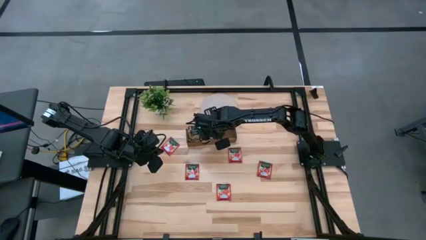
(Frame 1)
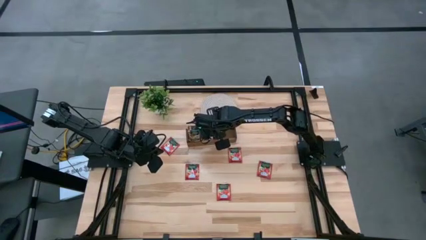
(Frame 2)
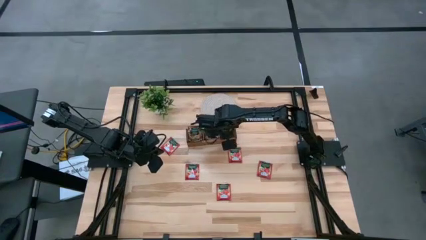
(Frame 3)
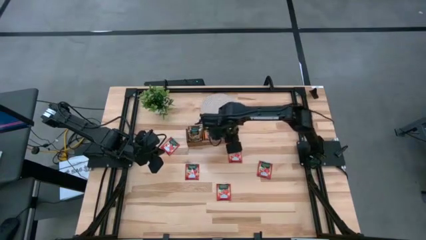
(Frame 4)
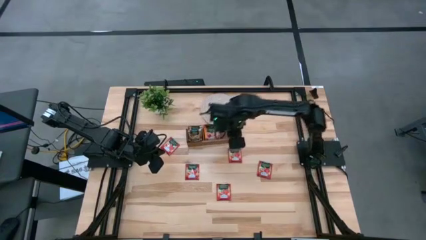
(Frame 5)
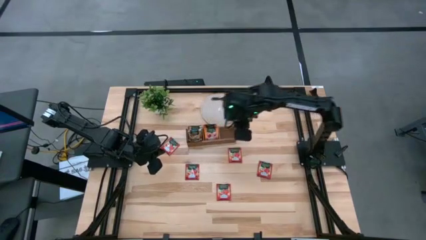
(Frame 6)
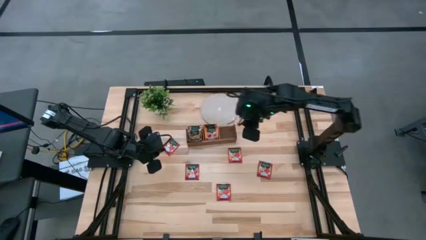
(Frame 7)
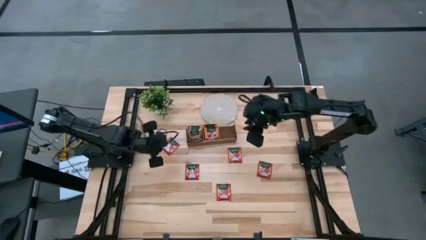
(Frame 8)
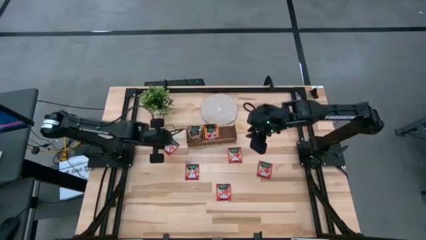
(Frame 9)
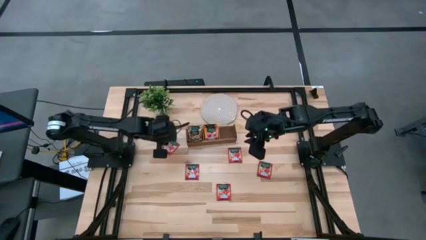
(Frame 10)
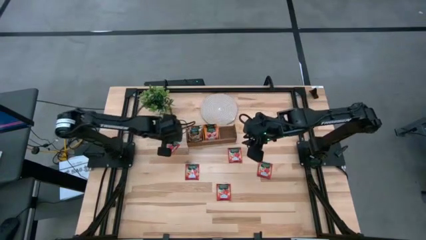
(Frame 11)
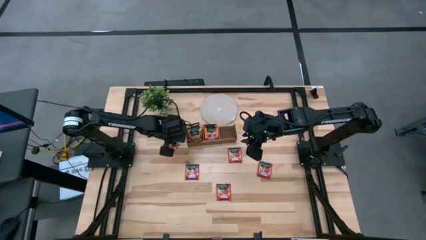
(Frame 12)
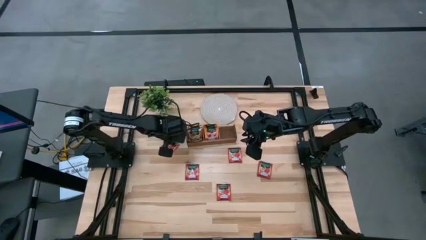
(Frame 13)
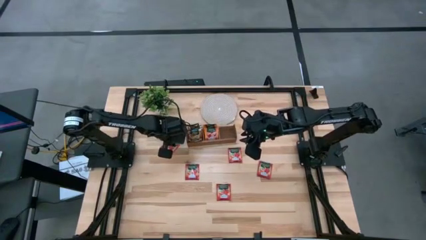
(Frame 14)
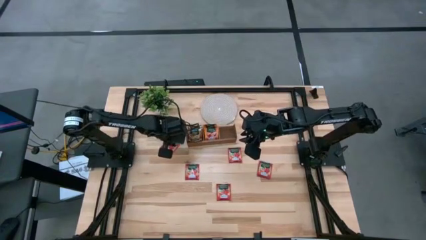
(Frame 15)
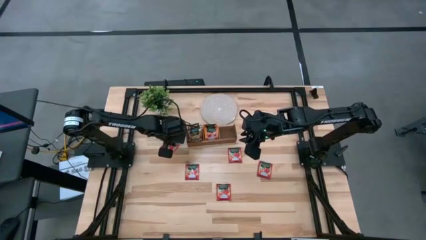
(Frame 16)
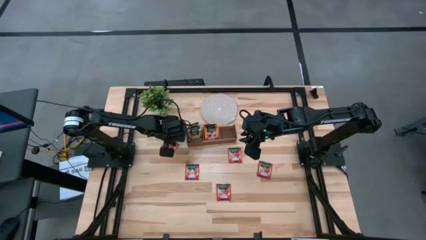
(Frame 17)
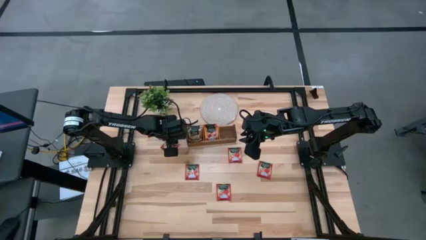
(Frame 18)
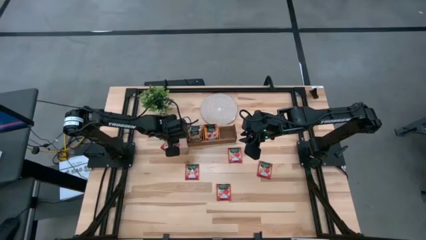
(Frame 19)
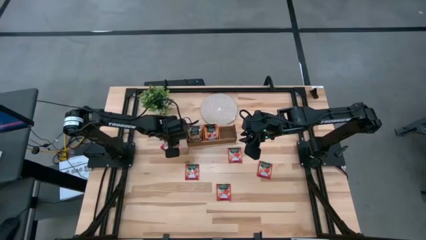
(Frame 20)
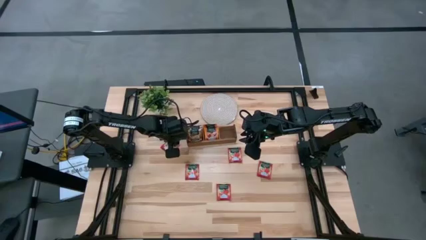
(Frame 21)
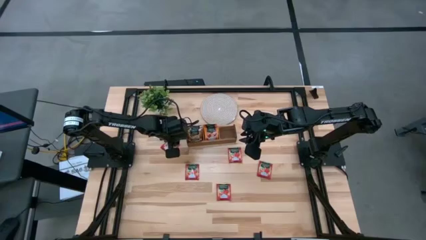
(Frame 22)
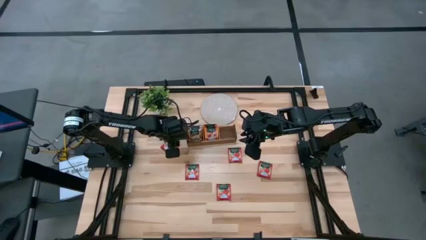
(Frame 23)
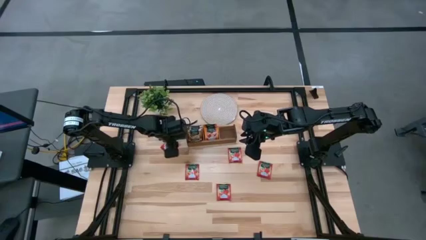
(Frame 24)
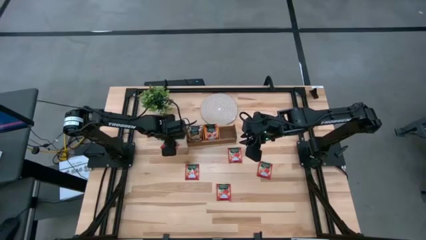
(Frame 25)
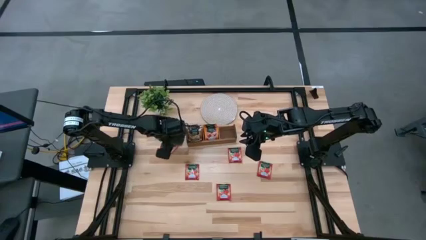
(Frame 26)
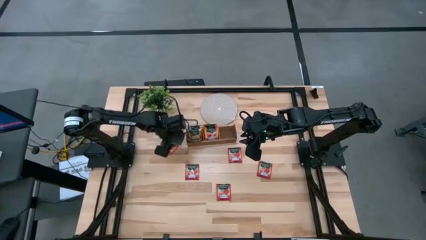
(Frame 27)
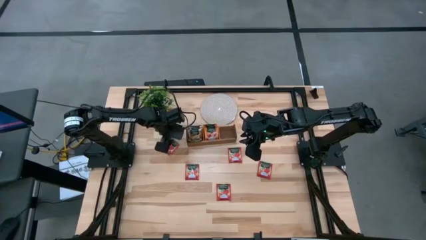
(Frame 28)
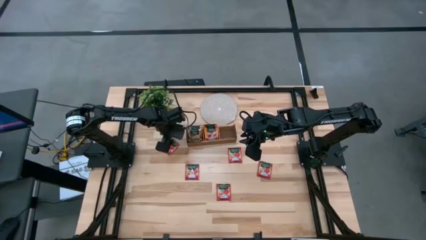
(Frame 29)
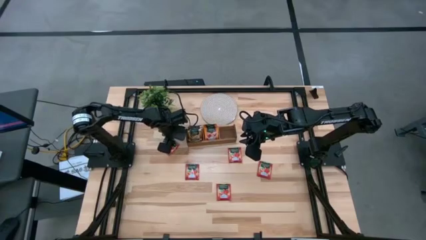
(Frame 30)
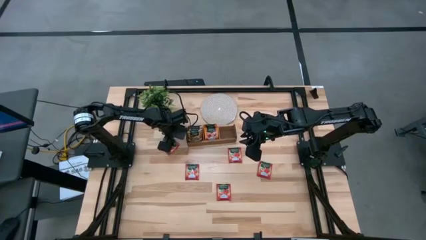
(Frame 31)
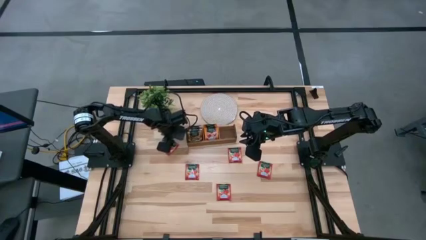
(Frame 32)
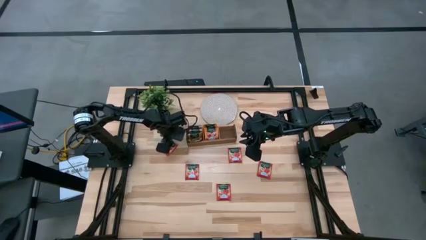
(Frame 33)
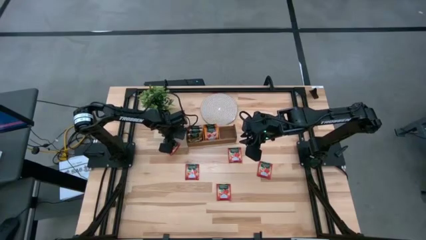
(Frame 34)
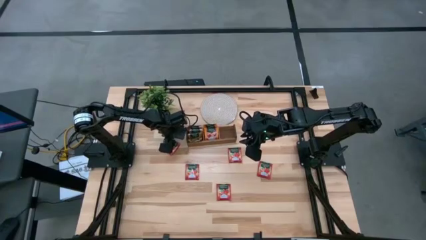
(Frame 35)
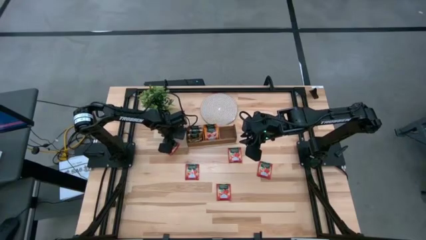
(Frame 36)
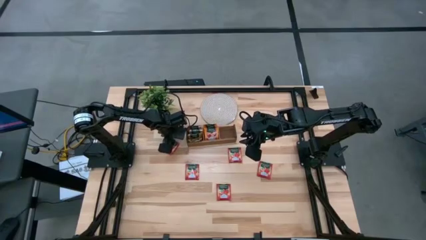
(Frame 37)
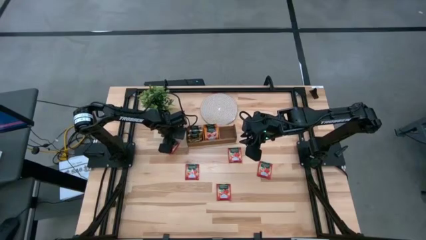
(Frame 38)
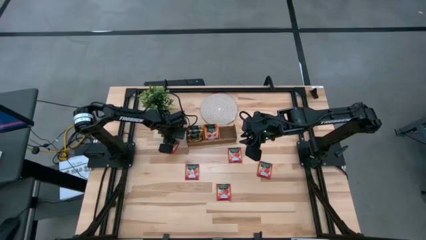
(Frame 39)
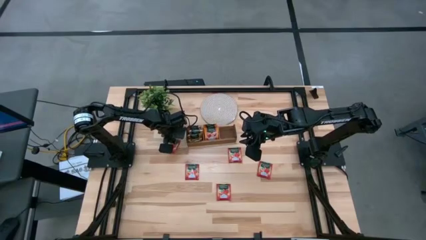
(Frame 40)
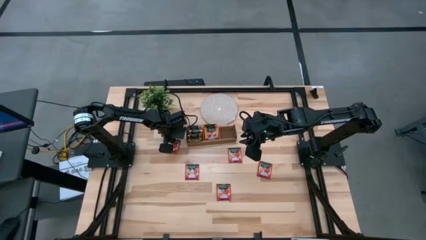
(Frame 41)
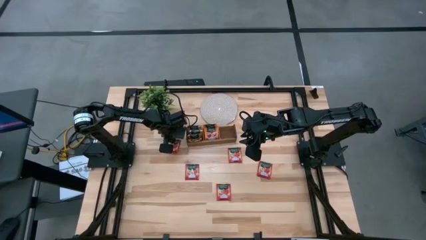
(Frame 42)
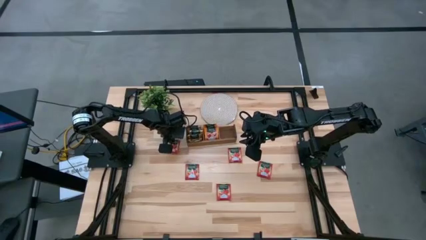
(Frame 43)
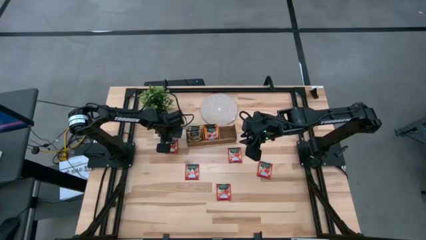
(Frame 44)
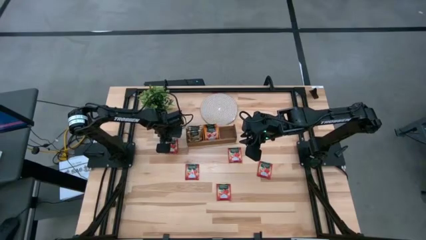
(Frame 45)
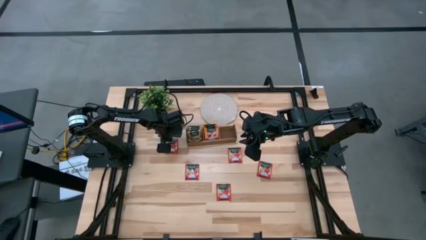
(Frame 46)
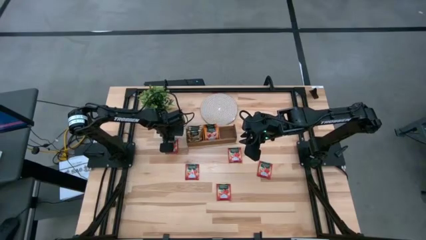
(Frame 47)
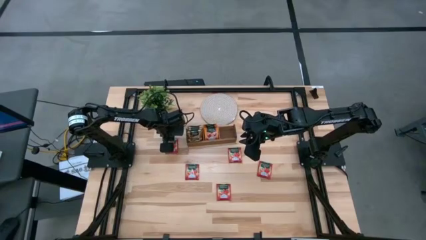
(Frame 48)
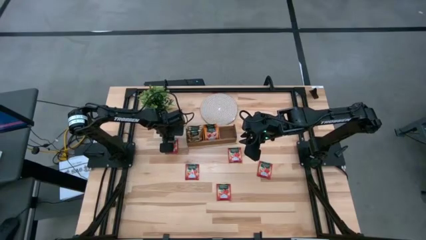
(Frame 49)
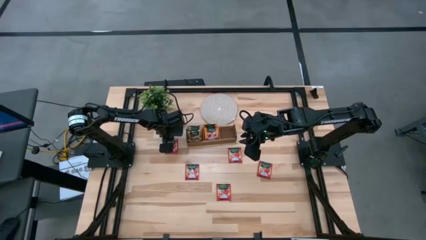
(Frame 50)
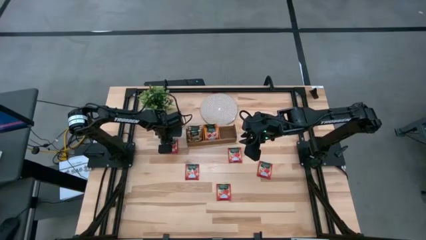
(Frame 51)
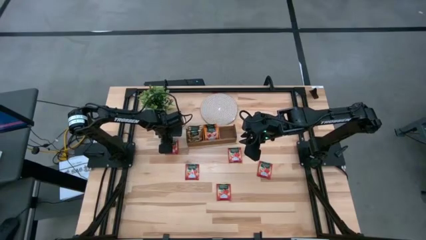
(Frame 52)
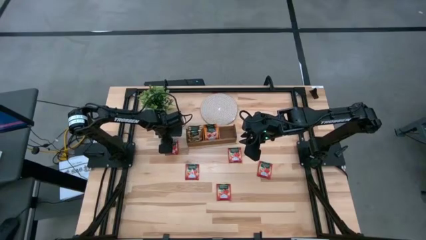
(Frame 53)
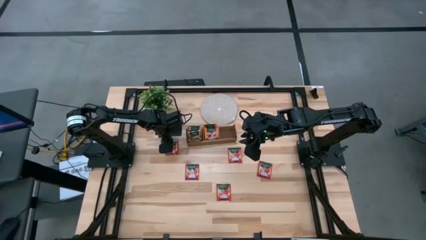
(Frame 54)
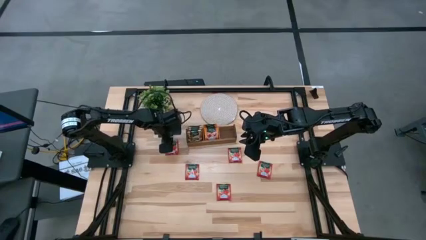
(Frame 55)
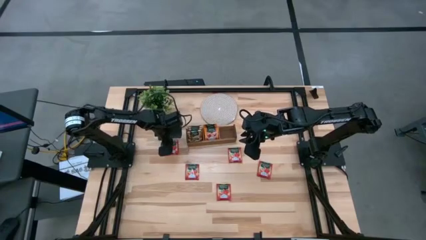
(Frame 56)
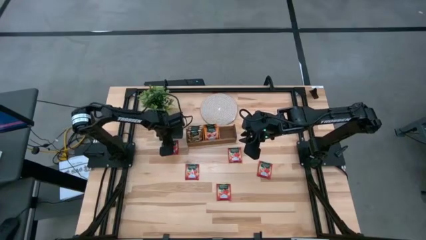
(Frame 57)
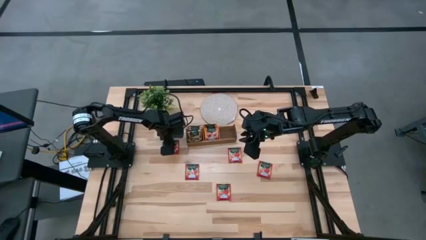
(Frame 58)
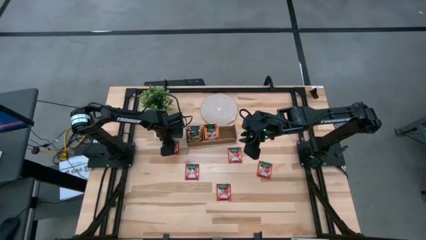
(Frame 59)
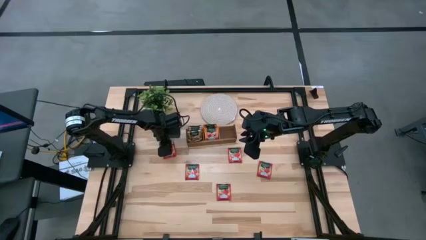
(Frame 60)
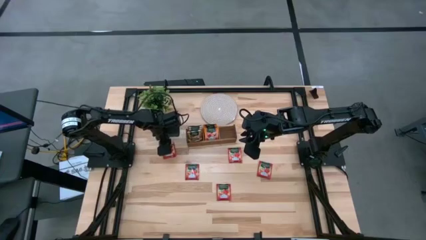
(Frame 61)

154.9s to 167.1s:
Task: Pick & Place Tea
Put the red tea bag into the right section of the wooden organizer
